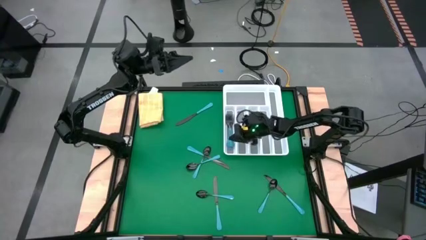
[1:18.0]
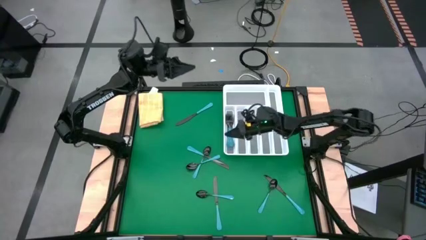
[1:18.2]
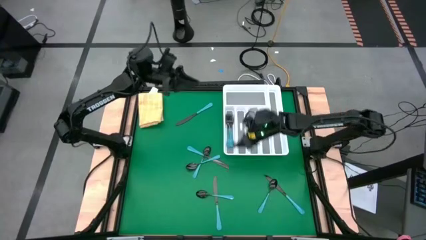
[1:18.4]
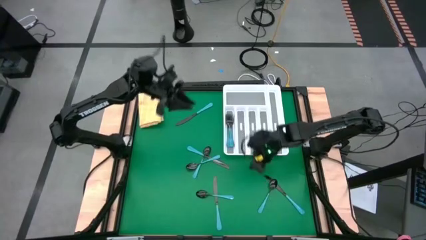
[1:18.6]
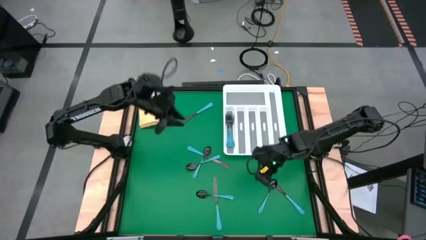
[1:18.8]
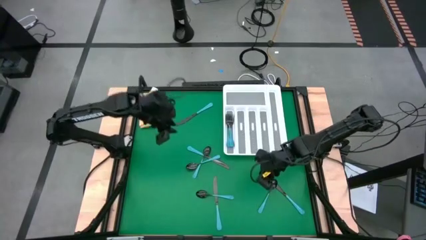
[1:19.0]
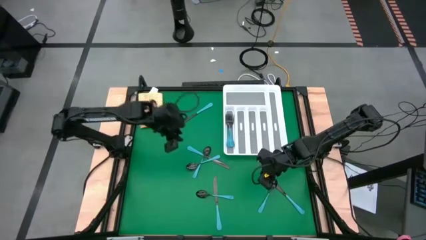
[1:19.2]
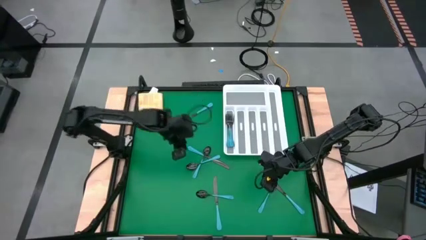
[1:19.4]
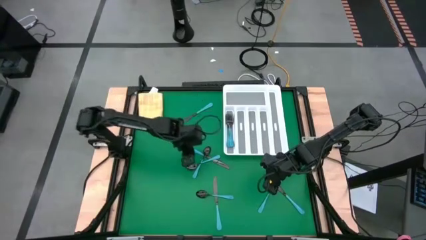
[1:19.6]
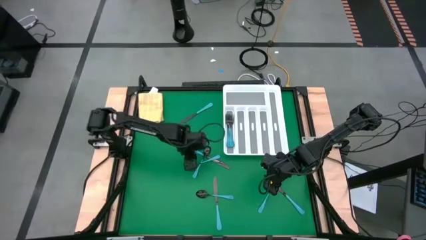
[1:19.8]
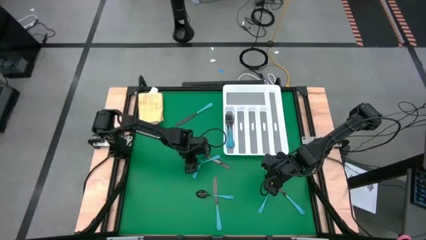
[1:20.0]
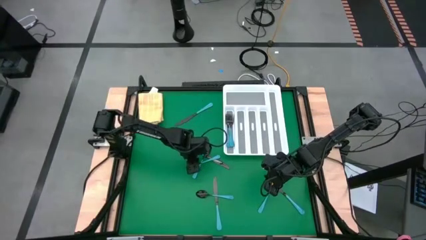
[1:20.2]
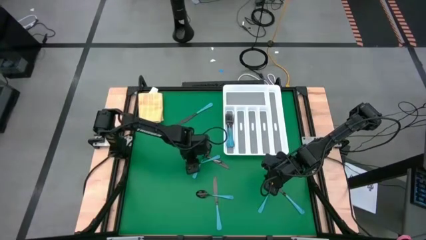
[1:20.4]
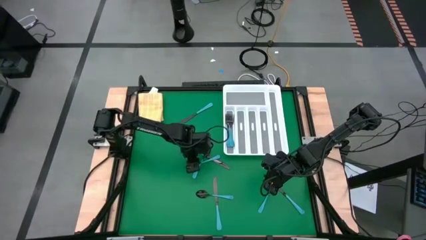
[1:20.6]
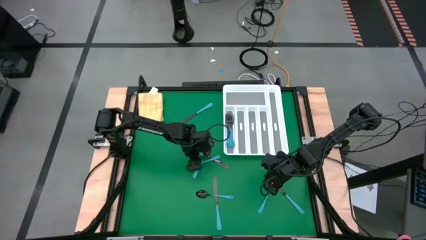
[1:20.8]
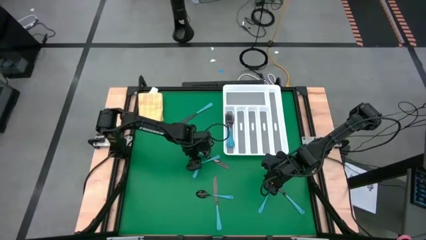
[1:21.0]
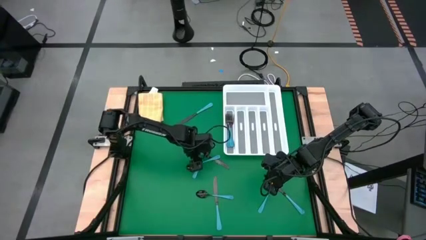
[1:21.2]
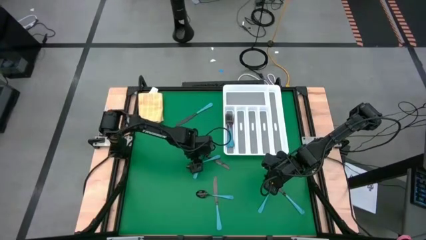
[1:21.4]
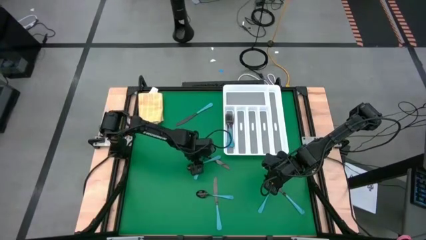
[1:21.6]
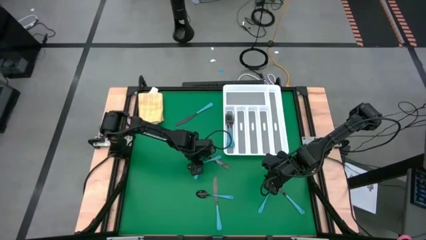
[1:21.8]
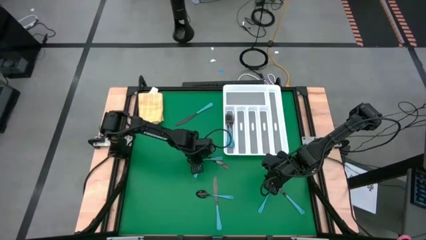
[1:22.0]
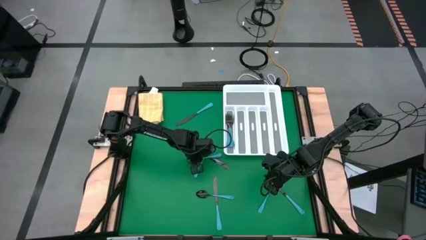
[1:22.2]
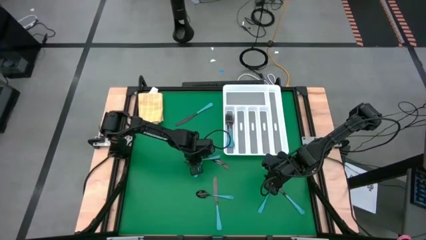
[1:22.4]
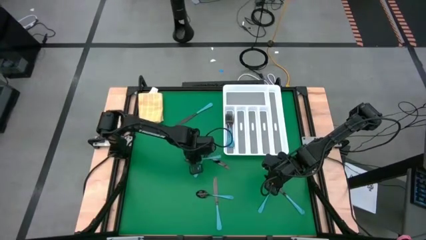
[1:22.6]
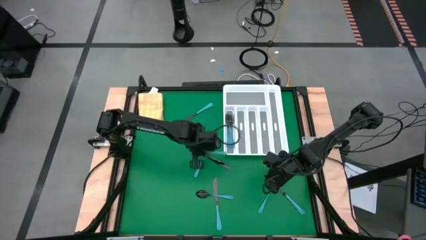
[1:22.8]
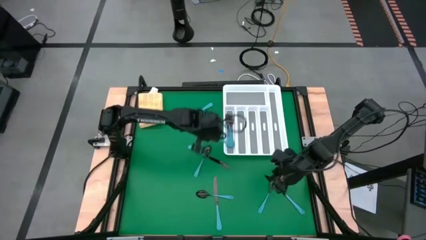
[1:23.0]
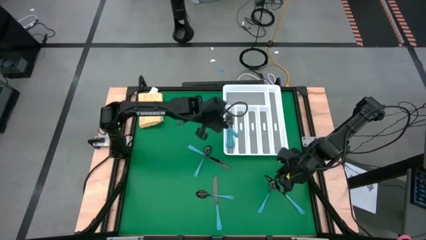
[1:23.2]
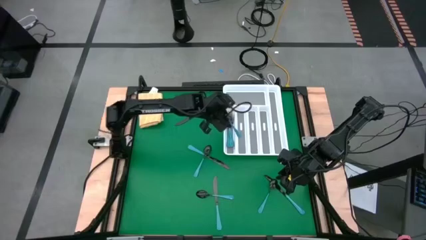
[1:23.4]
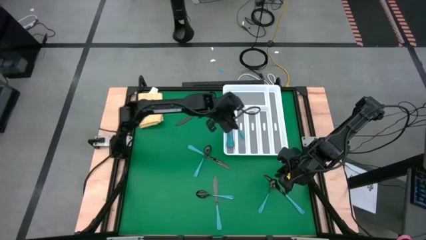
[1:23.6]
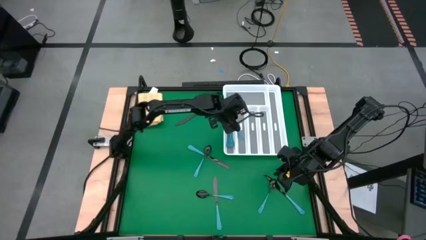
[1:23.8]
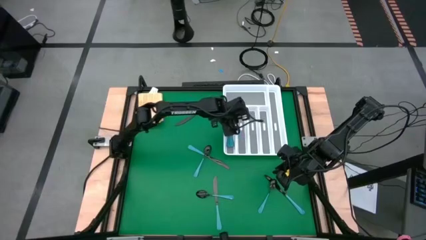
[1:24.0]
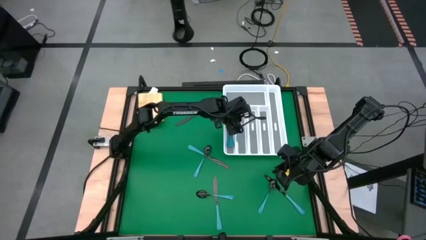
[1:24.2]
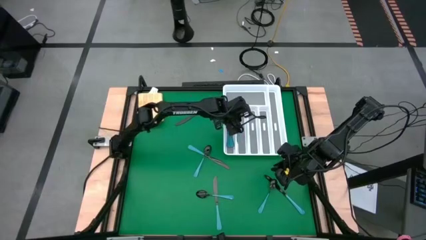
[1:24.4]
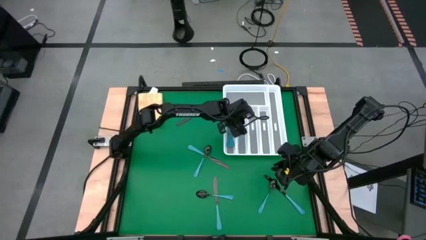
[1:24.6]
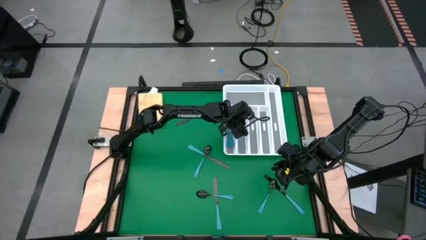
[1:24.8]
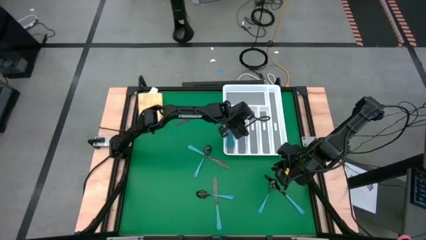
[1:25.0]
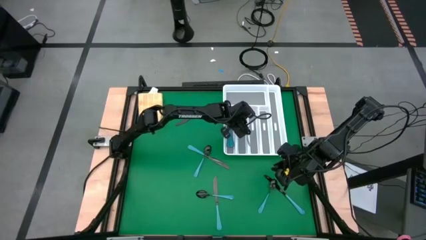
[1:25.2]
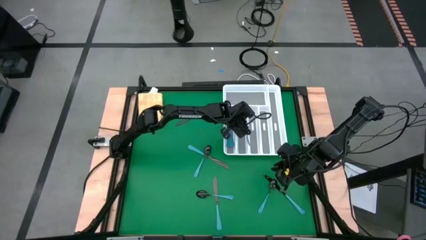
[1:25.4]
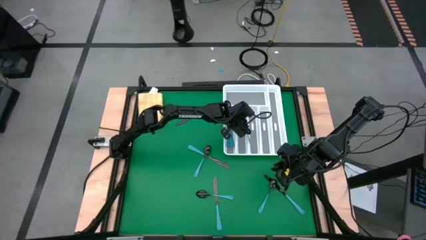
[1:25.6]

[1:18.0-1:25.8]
Task: Sort silverware
Put the blue spoon into the silverware organizer

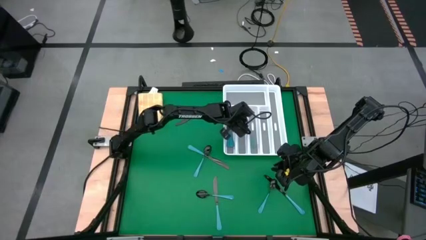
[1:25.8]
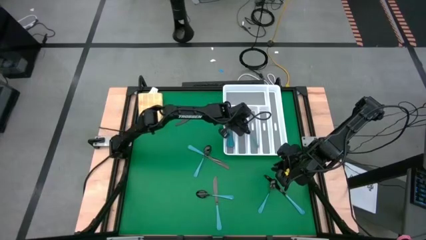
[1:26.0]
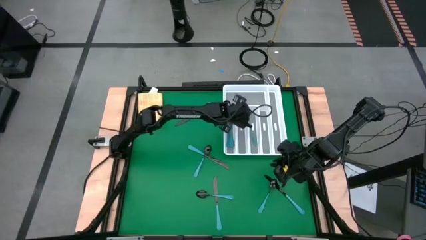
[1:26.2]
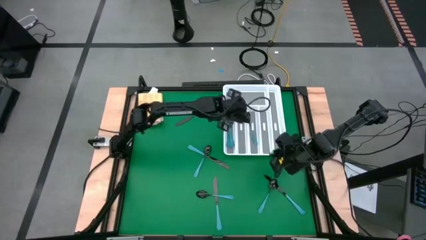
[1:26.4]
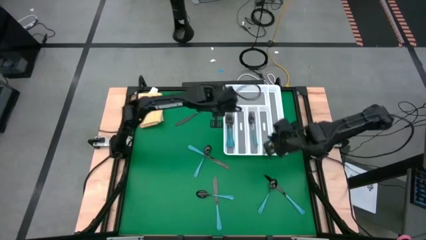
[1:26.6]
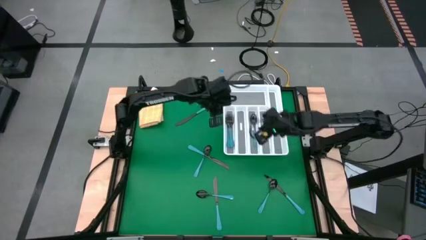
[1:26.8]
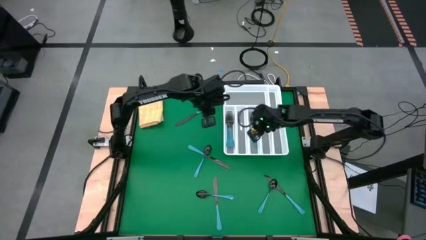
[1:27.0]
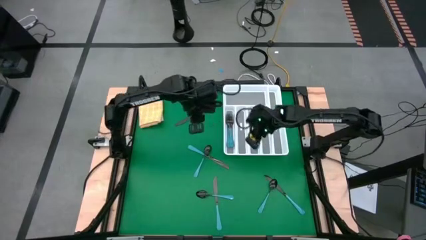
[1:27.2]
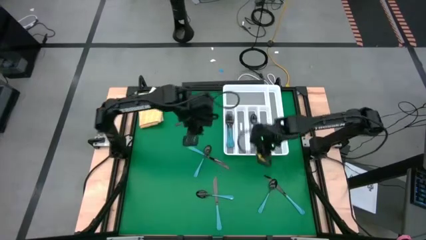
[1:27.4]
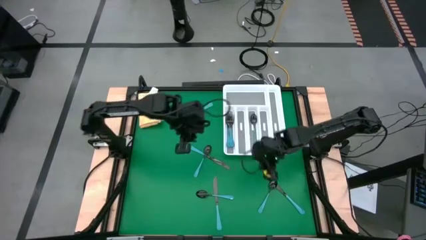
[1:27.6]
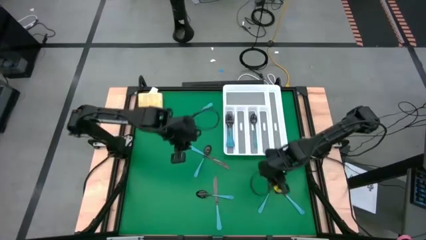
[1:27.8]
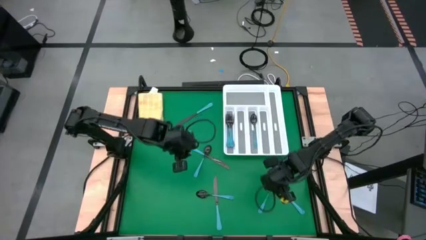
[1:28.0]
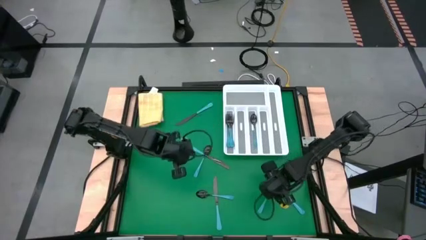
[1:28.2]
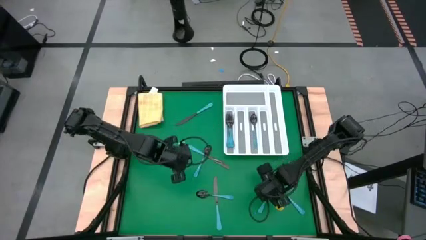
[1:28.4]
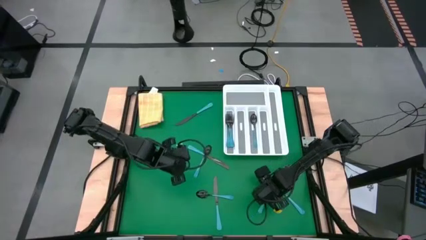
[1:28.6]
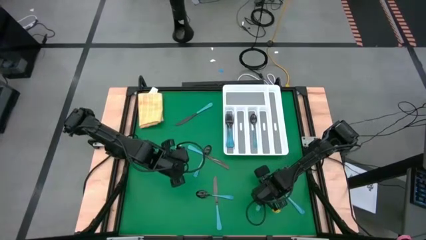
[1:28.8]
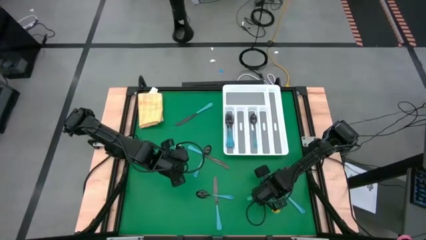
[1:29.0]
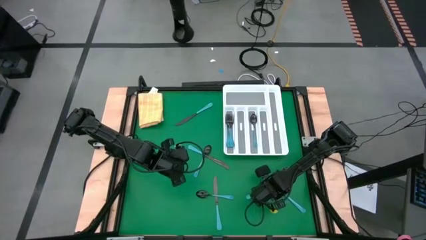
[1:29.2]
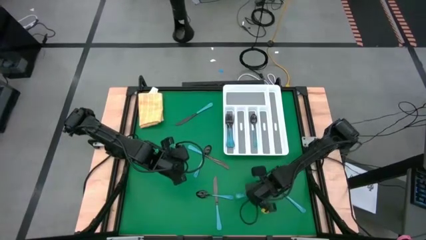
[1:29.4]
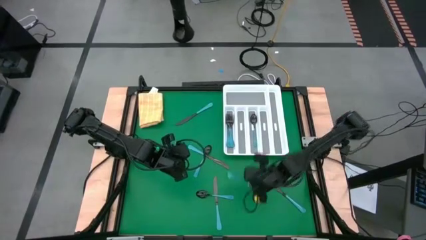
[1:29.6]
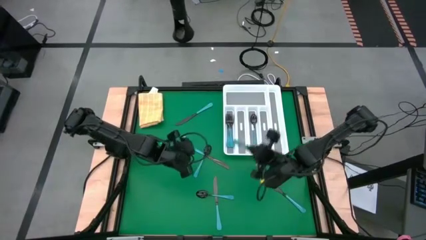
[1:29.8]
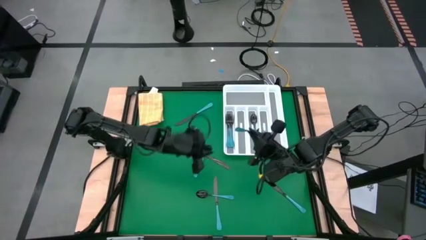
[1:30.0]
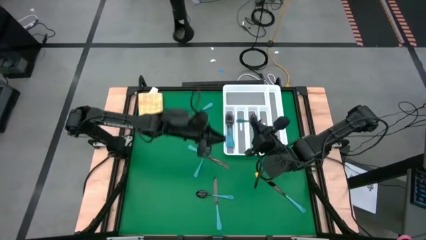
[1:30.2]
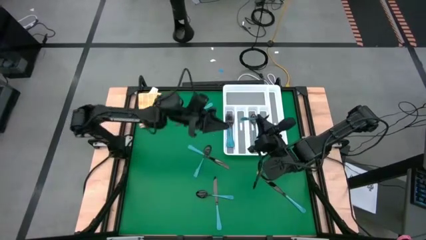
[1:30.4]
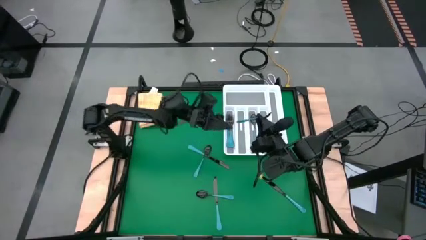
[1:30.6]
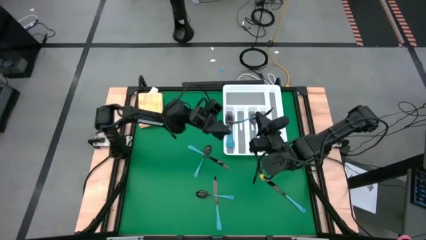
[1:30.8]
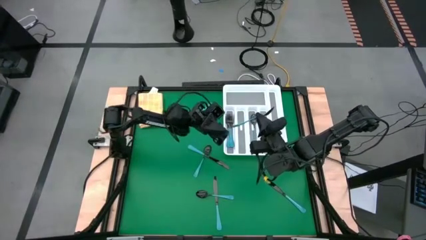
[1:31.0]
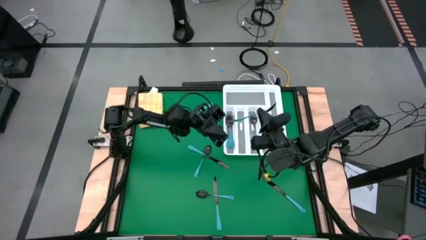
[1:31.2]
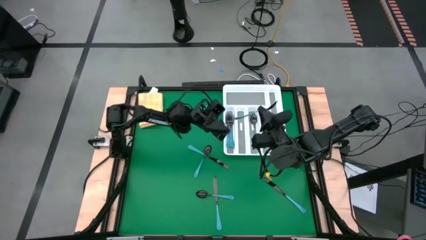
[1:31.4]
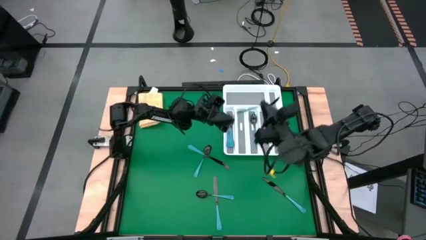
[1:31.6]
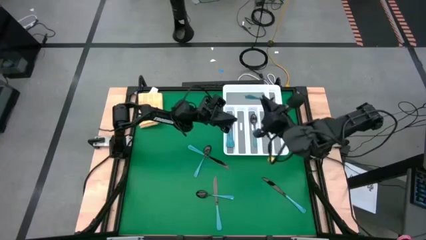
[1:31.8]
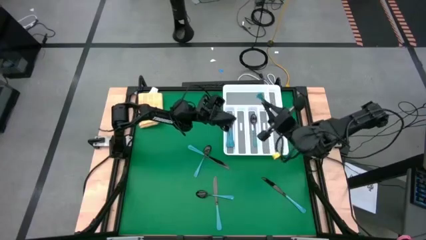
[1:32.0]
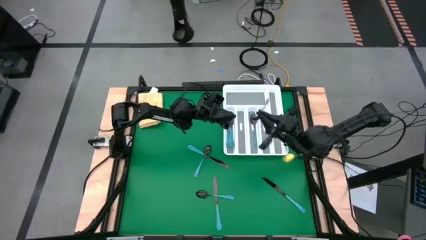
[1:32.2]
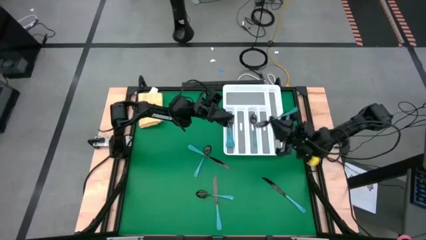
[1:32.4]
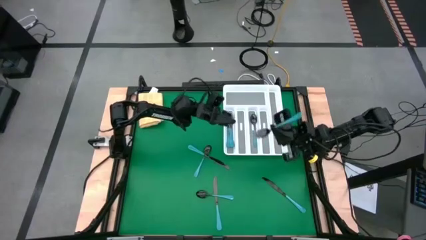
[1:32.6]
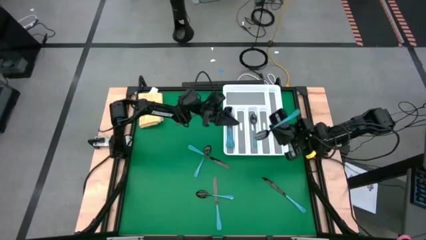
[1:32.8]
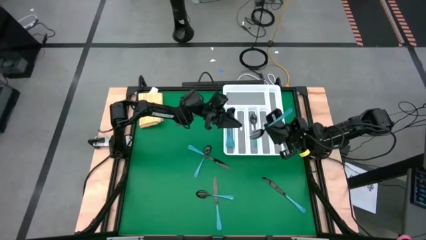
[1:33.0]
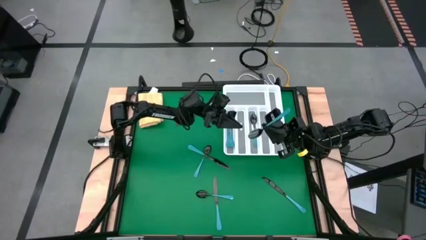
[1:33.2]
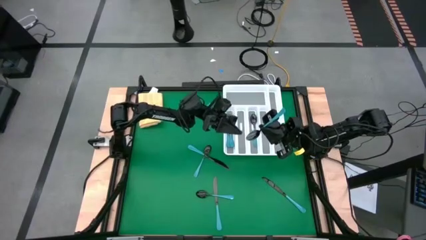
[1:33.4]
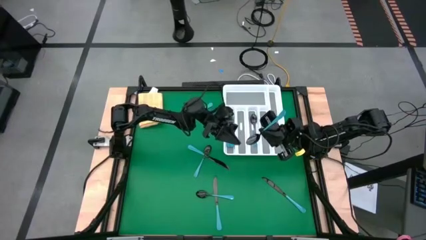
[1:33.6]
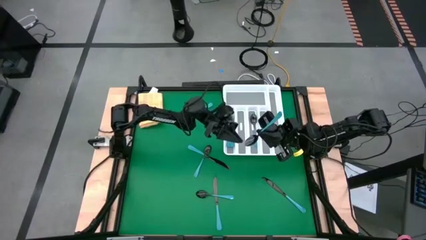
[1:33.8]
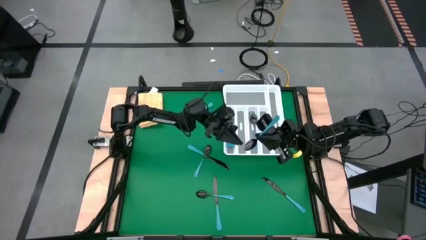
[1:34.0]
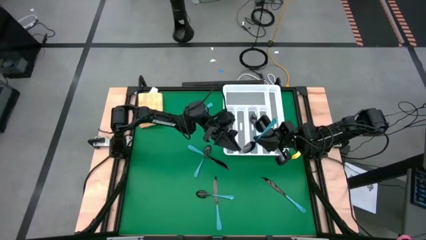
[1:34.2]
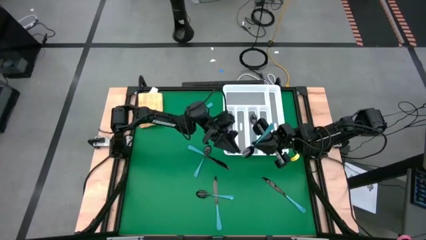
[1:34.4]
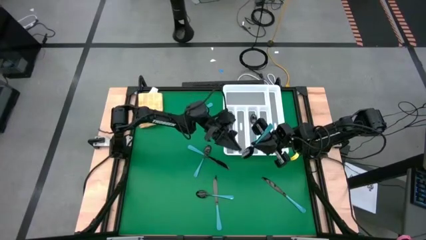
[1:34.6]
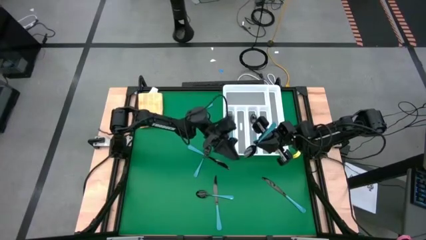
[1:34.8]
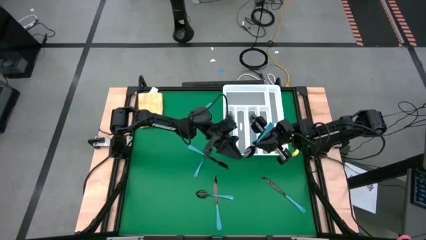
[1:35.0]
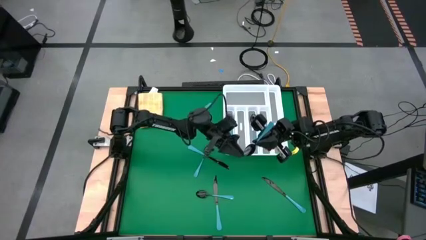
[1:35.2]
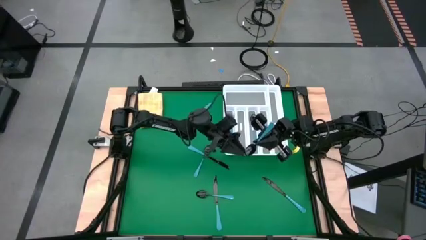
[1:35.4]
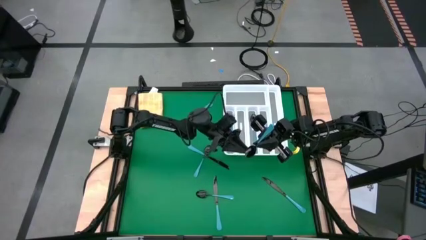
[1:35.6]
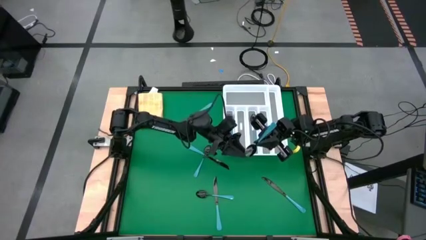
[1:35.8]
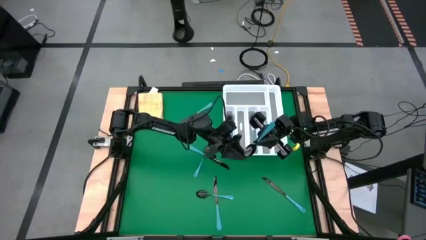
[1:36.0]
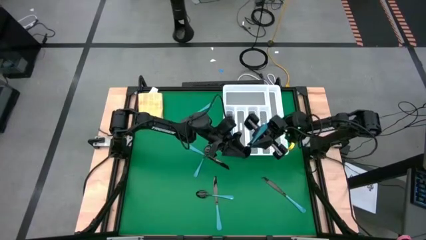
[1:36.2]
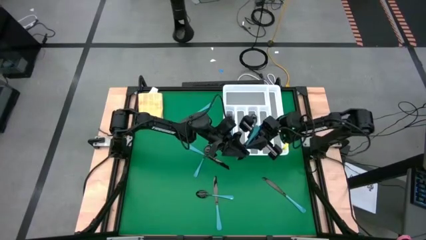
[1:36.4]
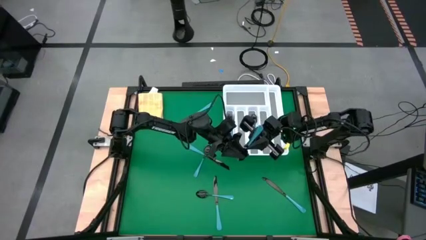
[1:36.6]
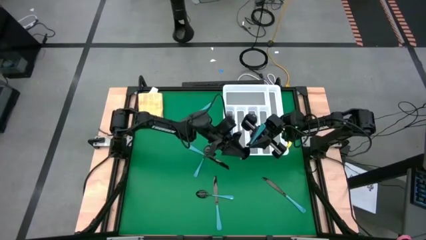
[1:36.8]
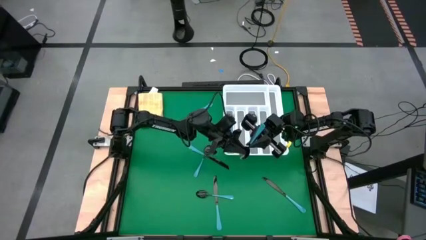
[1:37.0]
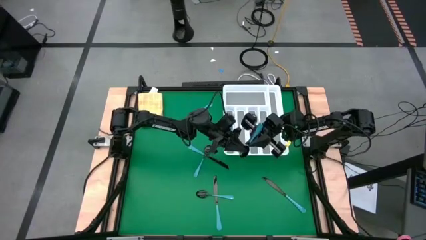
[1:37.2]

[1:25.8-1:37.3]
Put the blue spoon into the silverware organizer
